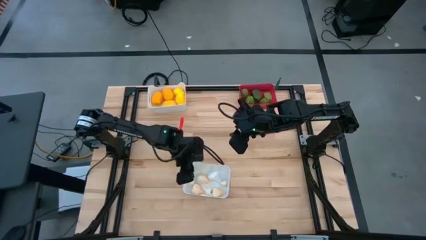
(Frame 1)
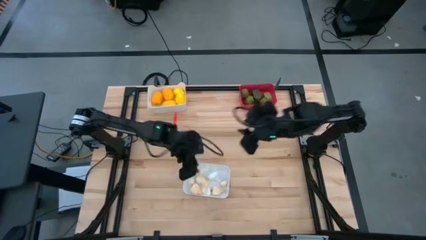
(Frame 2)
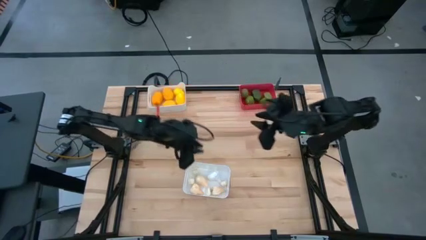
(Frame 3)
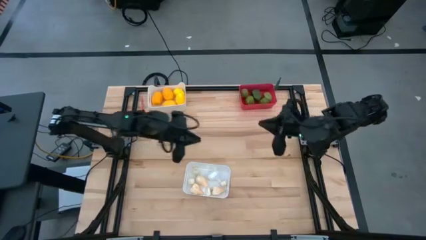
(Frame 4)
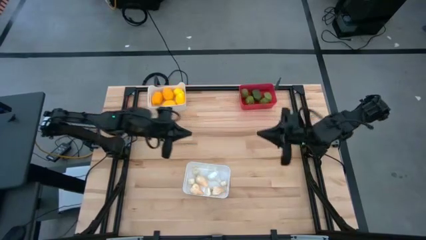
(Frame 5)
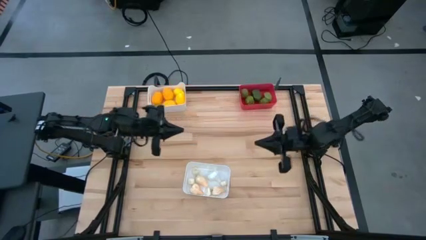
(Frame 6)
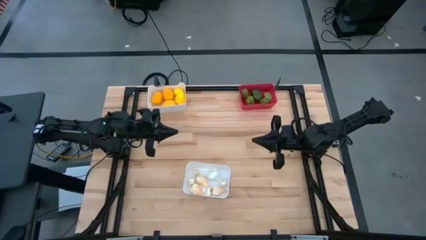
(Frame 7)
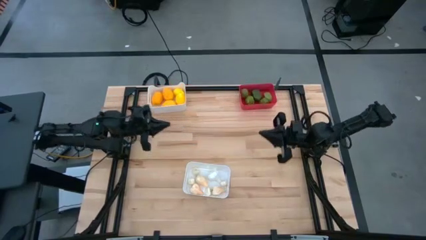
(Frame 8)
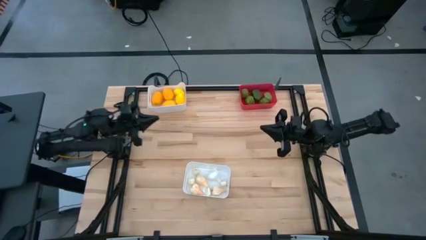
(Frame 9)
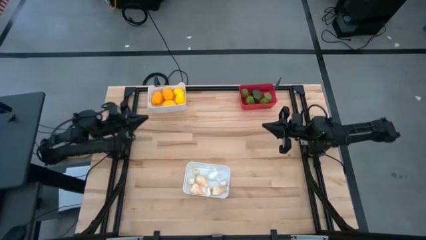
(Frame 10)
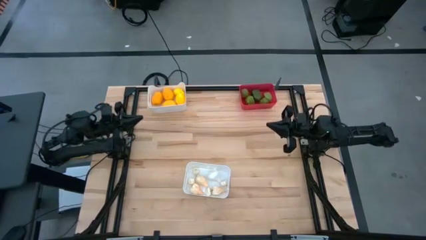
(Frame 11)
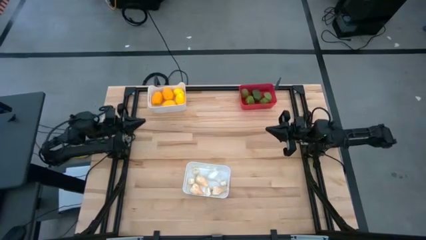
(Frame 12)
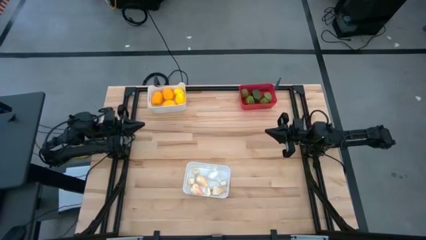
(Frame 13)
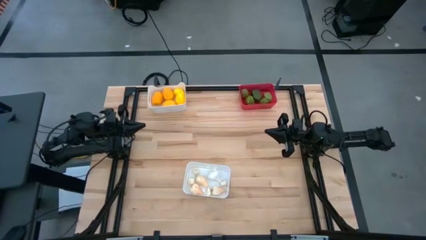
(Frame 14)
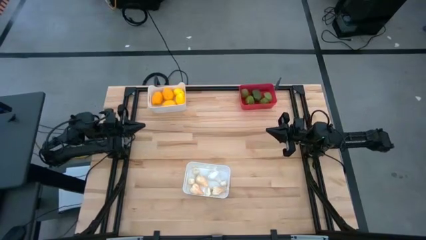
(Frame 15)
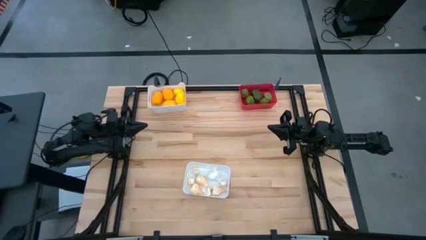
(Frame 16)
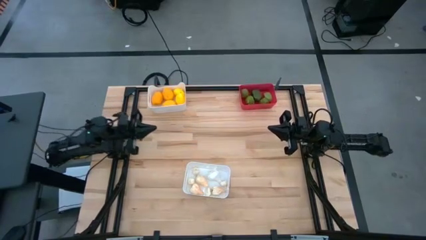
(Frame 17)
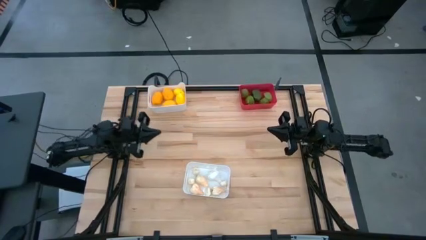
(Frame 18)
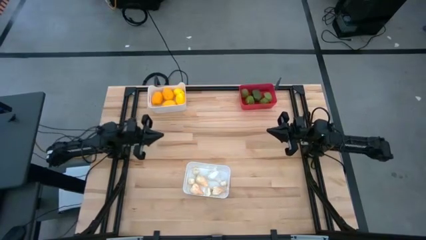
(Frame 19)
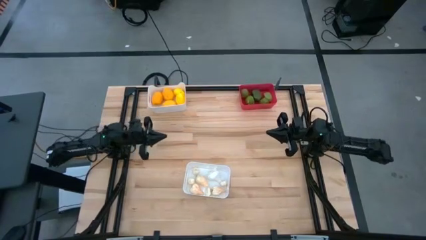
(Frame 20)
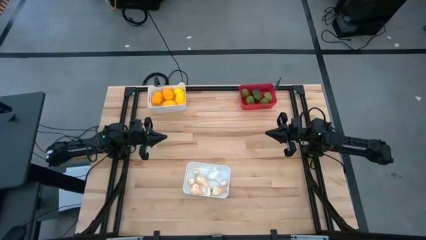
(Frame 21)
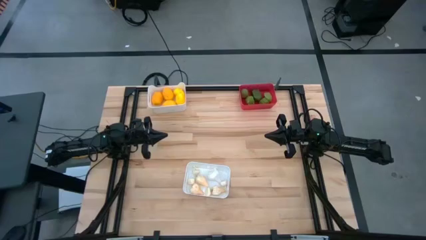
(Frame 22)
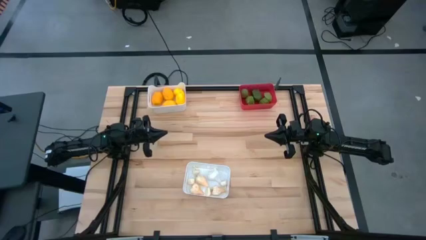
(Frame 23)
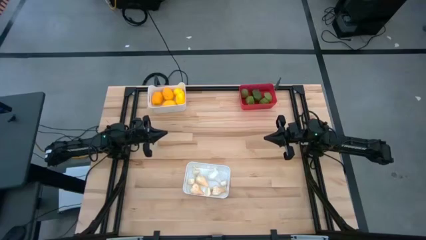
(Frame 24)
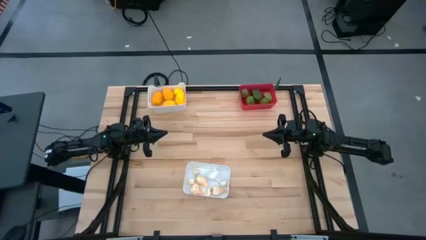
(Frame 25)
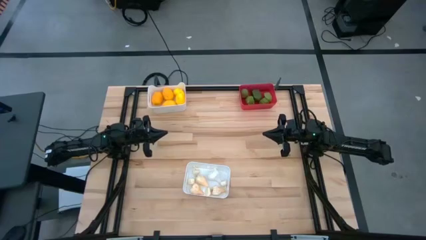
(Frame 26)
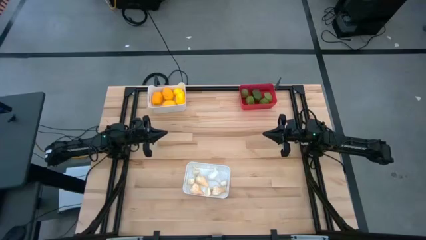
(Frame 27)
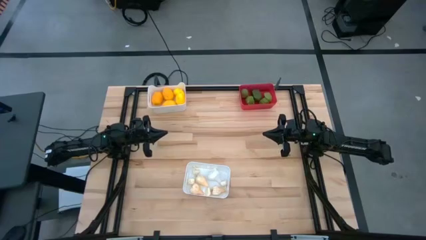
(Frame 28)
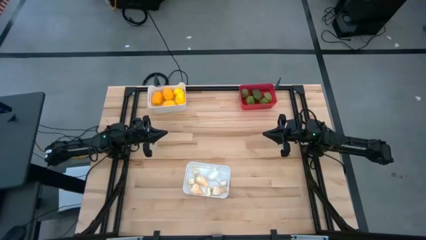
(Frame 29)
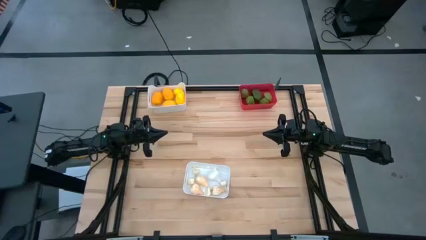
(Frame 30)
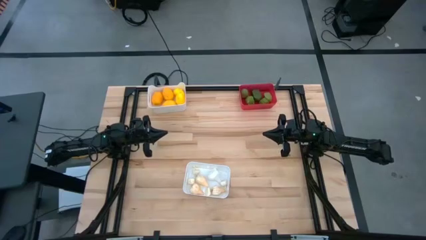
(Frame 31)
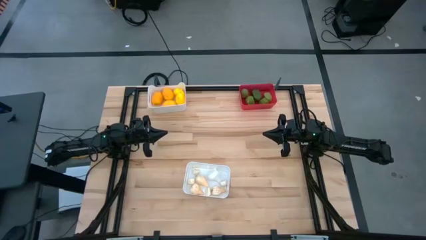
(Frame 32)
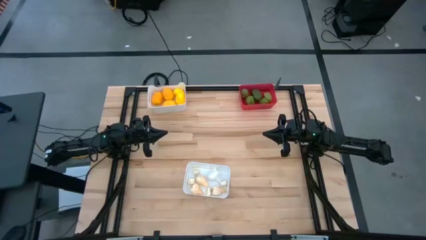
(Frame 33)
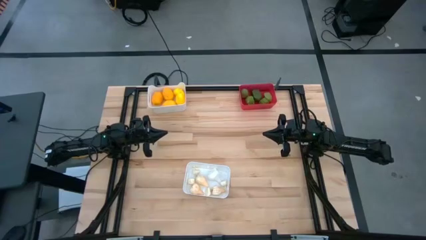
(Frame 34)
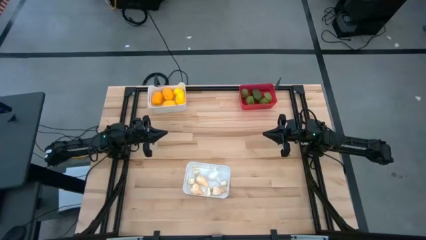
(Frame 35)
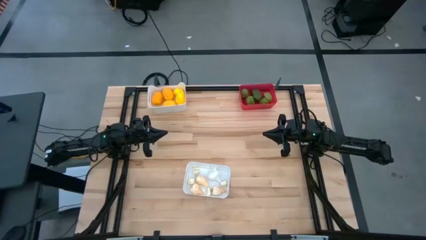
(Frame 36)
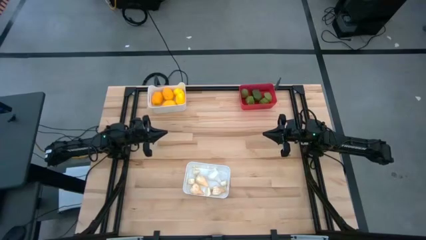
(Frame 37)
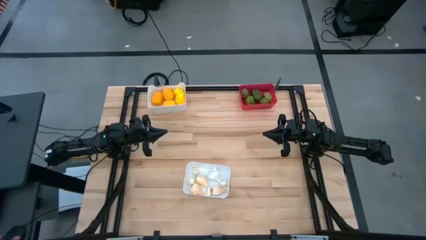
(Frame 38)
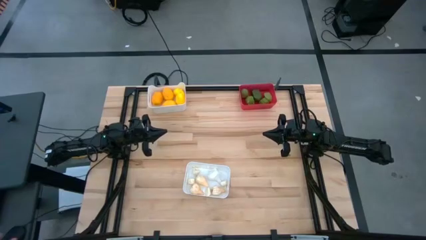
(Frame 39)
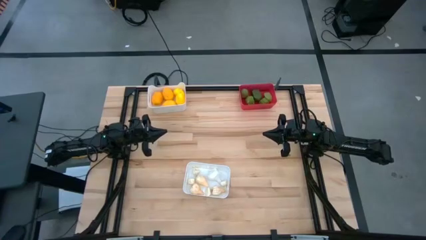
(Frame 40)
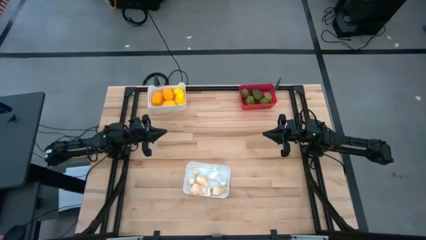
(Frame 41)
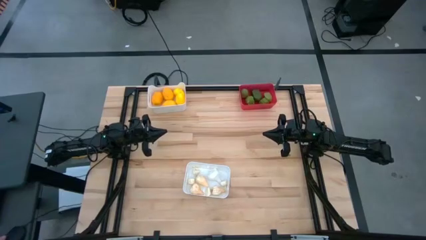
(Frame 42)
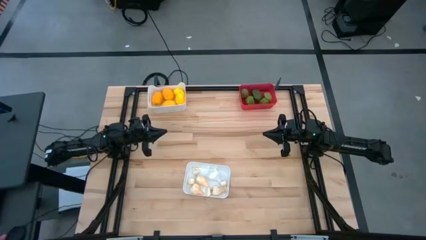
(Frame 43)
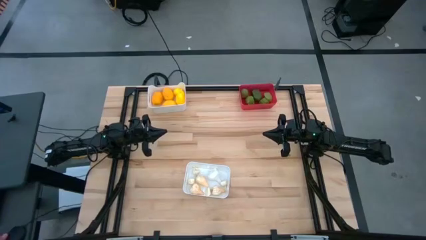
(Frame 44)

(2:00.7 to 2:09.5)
Task: Sort produce into baskets
Return to Home Position

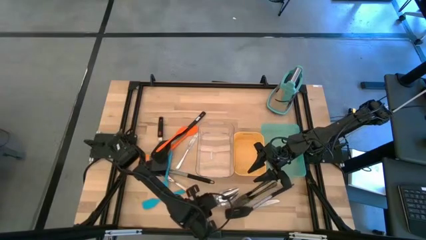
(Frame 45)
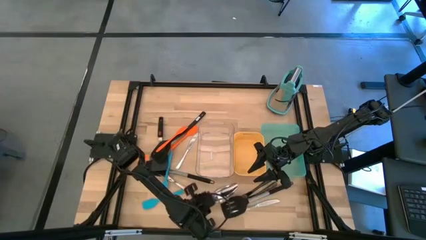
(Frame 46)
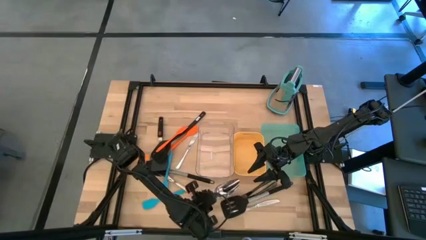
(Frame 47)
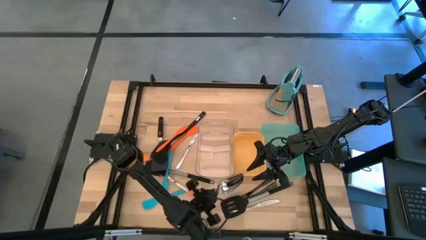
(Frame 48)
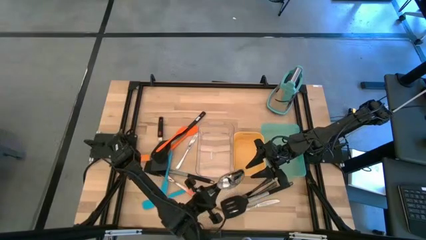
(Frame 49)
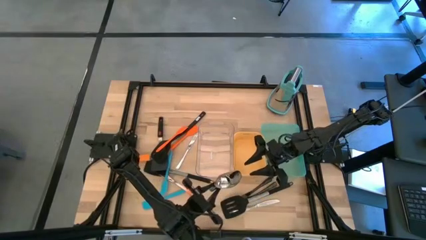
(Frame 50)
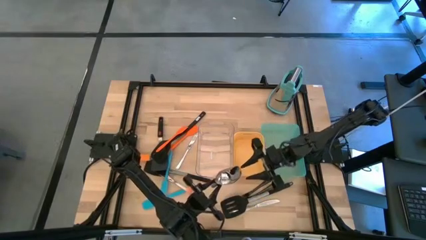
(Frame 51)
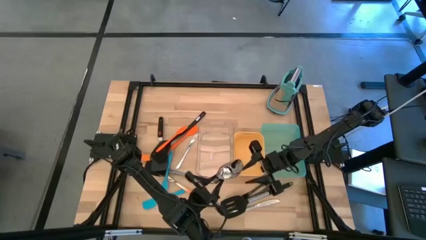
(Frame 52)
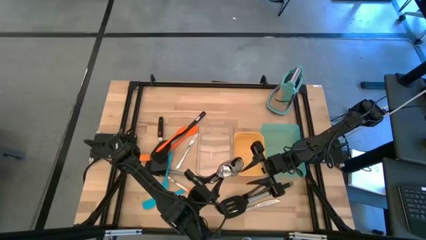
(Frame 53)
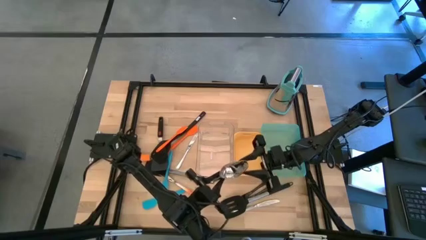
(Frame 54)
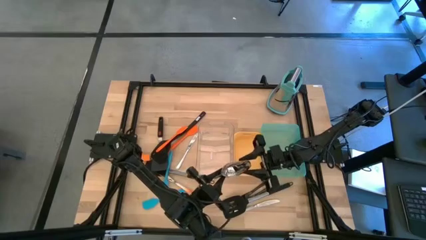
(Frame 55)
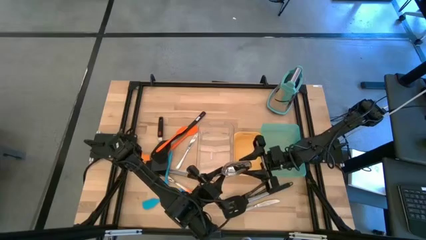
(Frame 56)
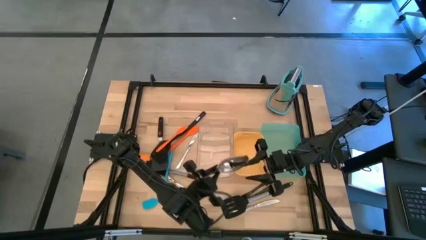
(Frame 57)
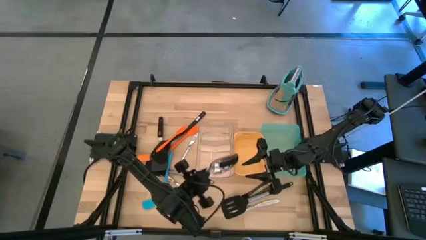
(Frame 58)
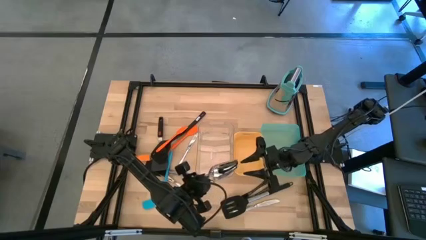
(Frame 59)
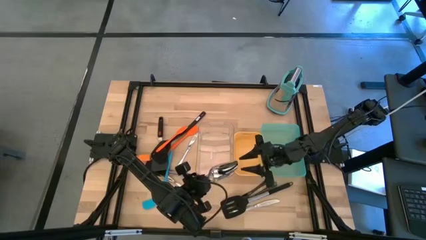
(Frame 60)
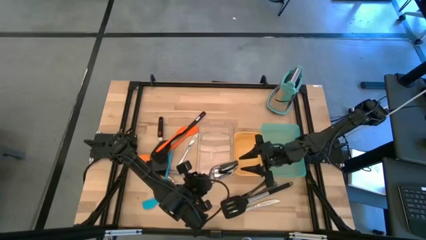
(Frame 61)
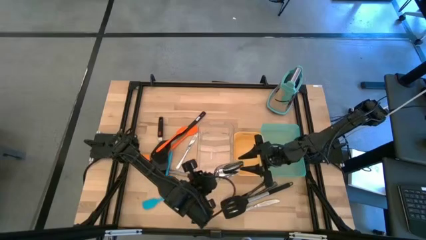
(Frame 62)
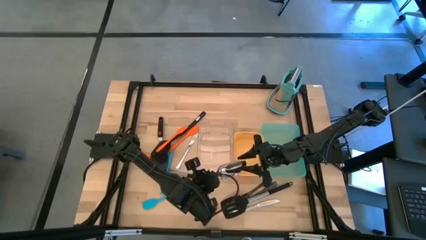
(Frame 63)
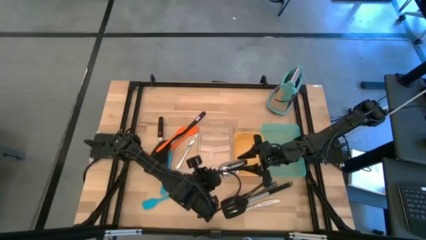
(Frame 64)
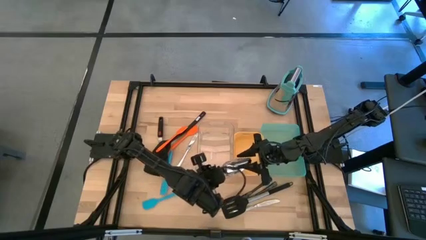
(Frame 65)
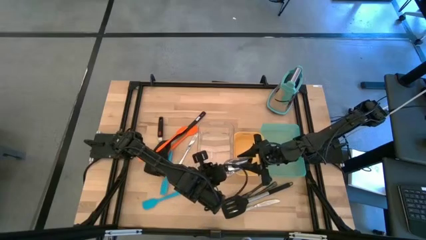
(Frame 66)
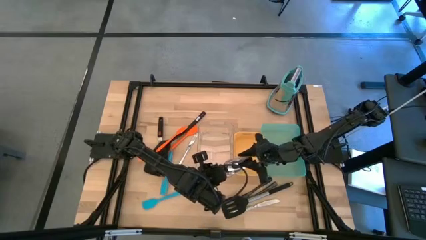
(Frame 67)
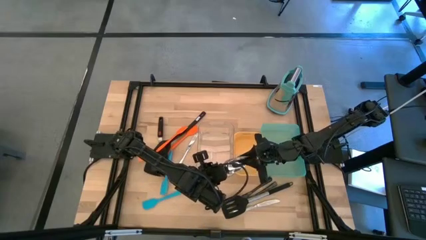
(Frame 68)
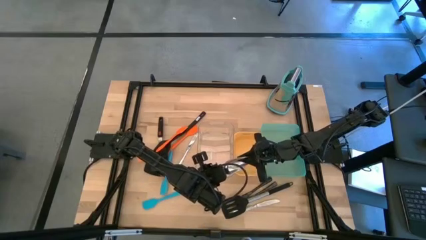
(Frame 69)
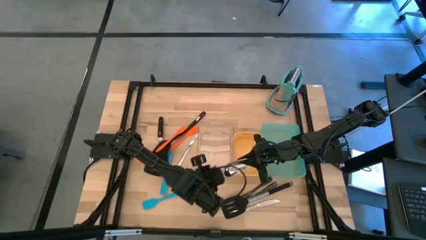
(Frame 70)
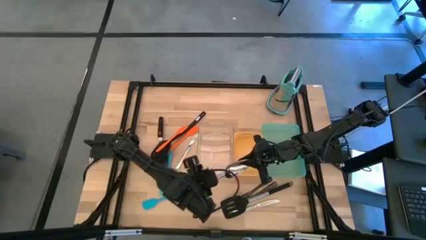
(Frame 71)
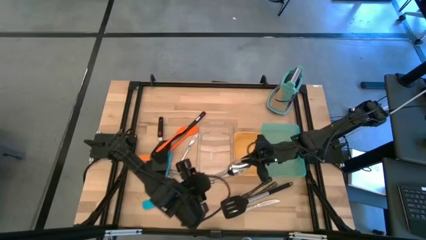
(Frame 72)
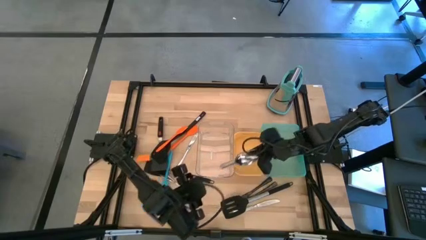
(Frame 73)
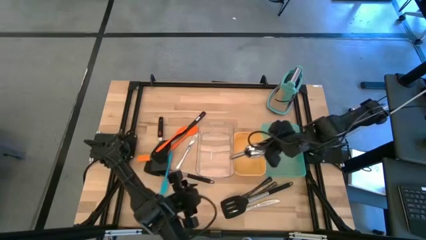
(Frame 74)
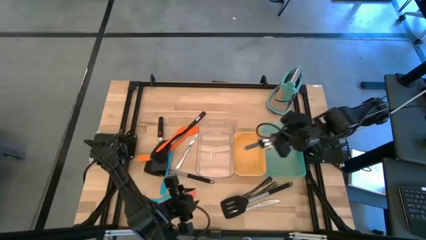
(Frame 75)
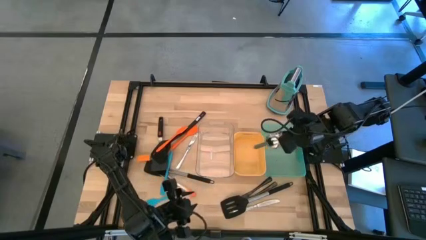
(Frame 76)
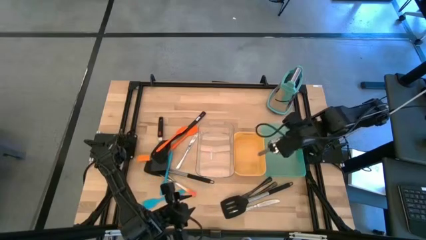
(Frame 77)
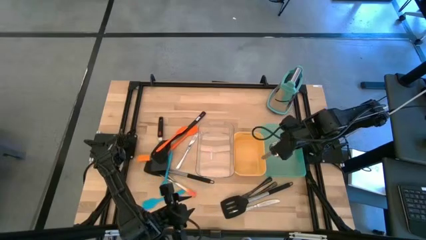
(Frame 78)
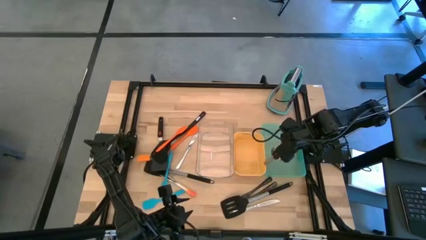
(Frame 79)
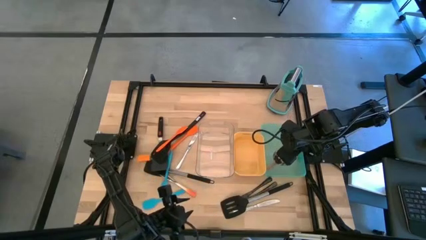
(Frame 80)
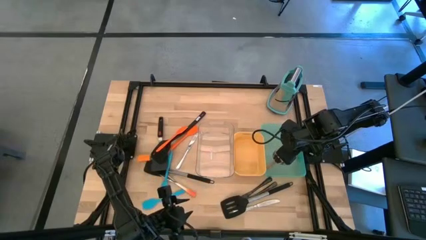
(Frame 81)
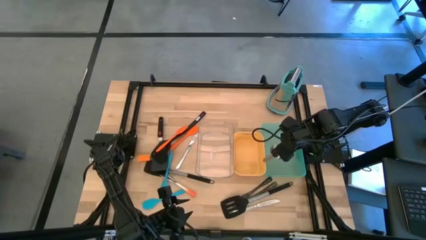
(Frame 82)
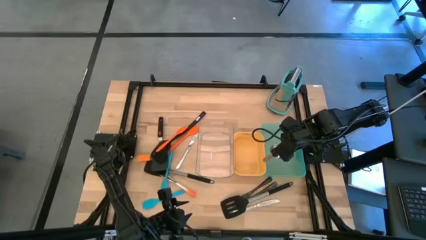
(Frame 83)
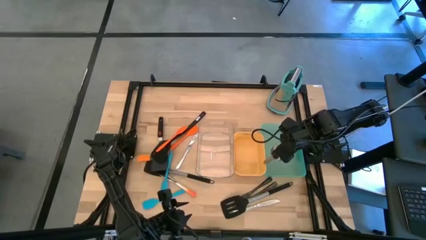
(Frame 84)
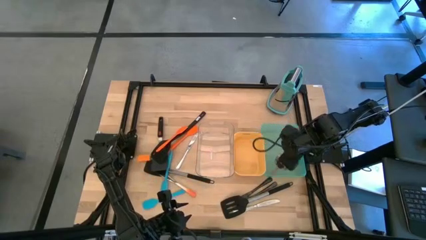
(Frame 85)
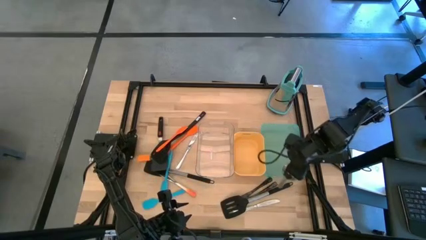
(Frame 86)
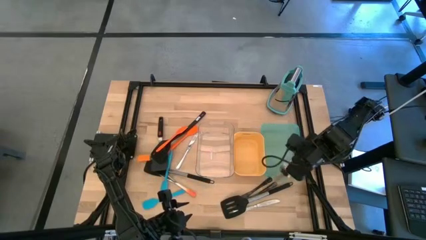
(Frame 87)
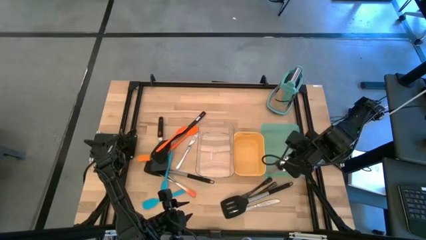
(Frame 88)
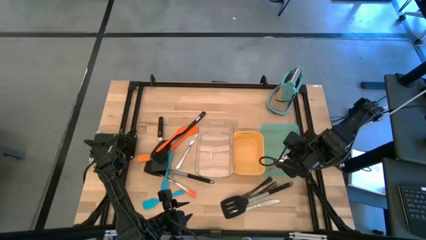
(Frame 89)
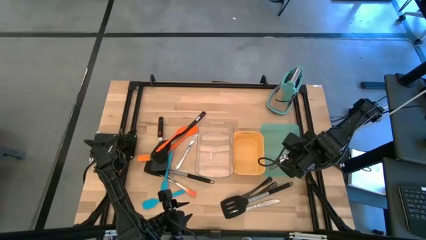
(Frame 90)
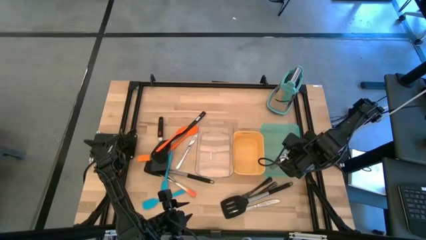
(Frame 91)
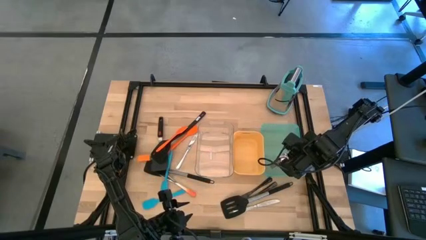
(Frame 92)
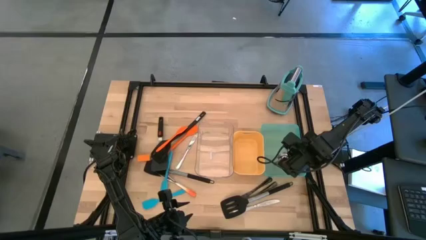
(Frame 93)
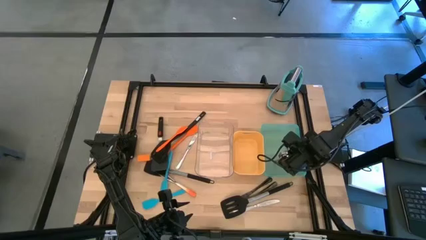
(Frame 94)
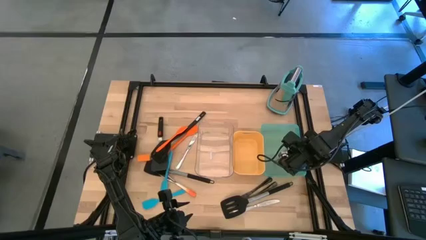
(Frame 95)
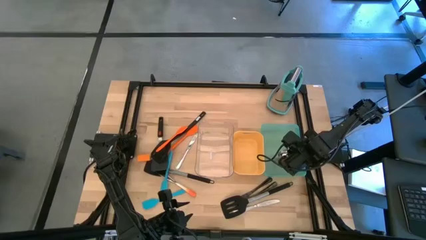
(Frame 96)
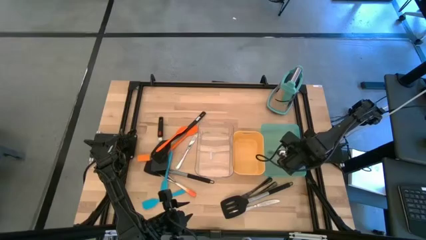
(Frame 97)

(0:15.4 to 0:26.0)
Task: Pick & Place Kitchen Items
Put the ice shovel into the green bin
